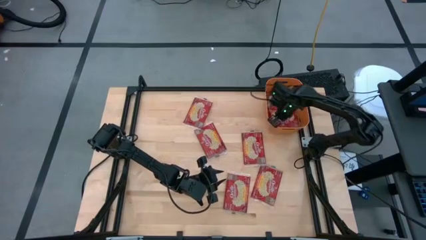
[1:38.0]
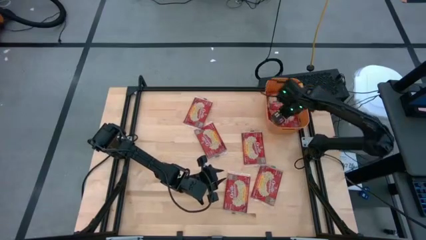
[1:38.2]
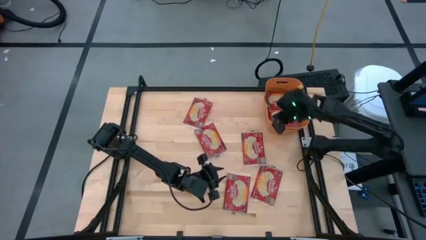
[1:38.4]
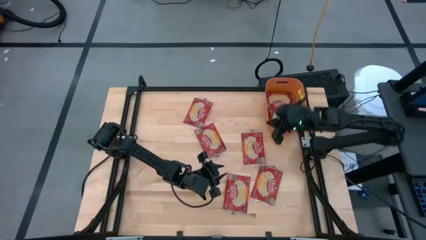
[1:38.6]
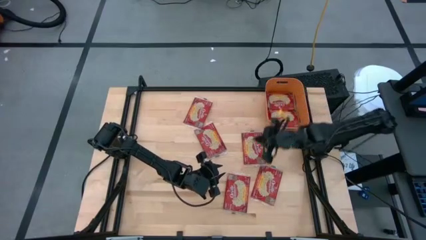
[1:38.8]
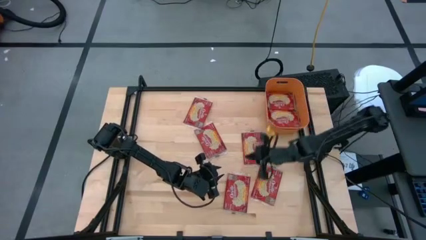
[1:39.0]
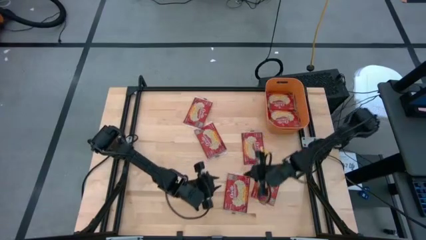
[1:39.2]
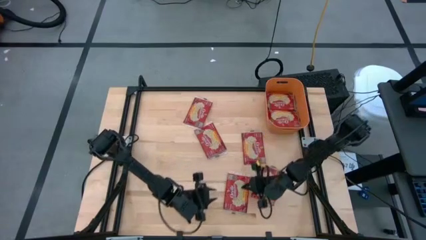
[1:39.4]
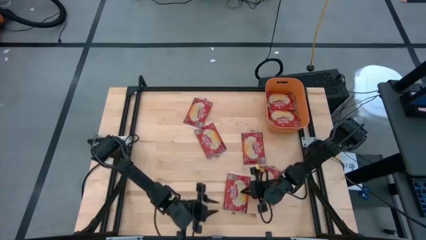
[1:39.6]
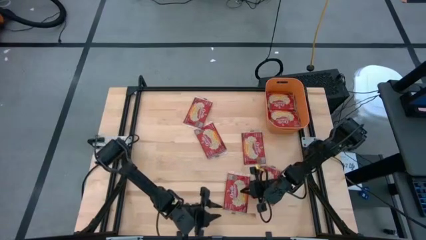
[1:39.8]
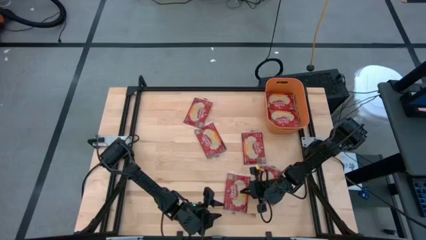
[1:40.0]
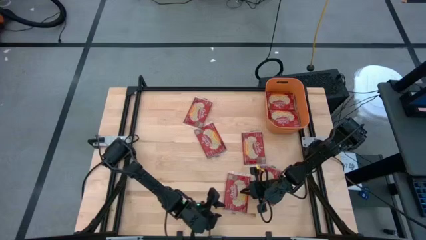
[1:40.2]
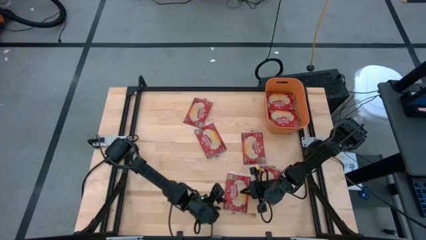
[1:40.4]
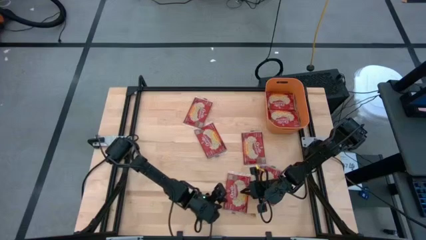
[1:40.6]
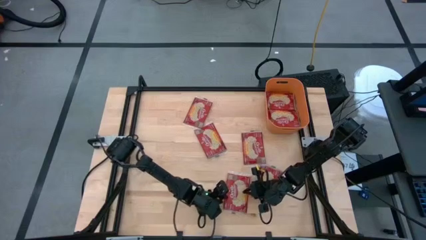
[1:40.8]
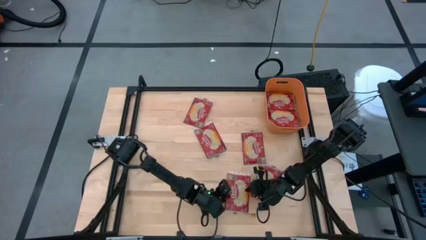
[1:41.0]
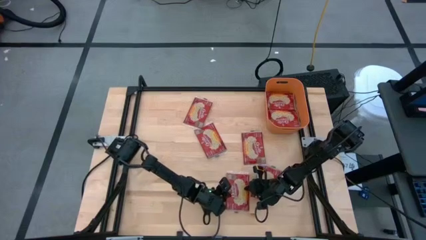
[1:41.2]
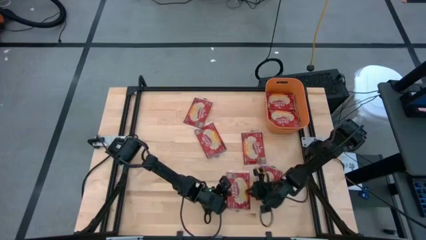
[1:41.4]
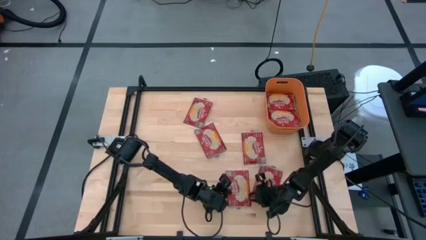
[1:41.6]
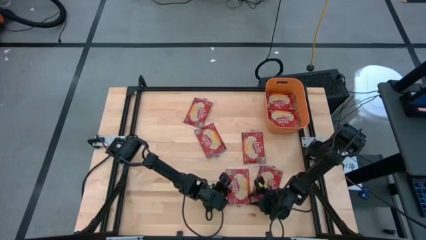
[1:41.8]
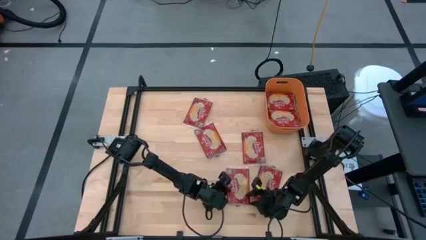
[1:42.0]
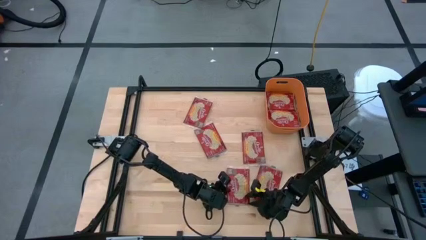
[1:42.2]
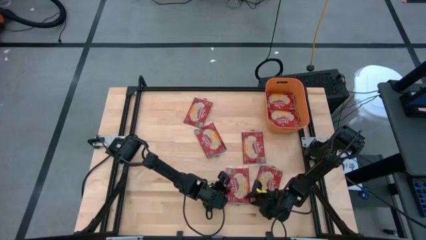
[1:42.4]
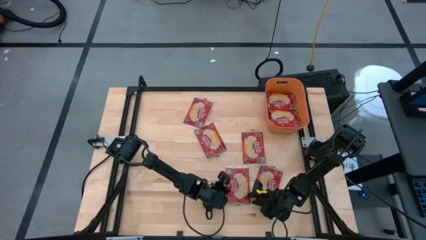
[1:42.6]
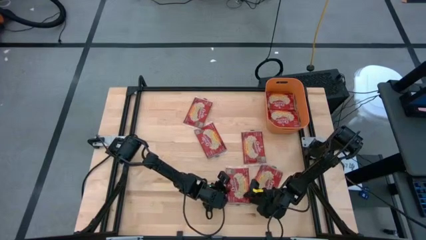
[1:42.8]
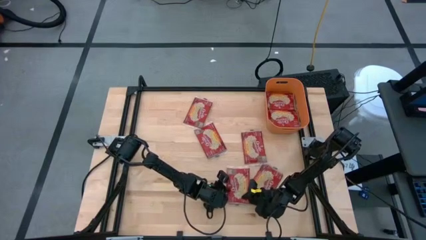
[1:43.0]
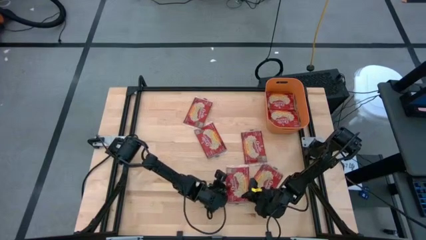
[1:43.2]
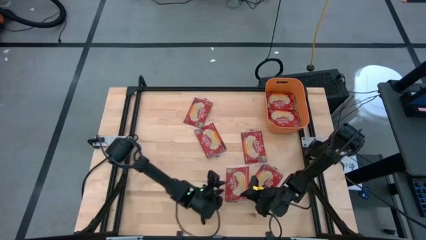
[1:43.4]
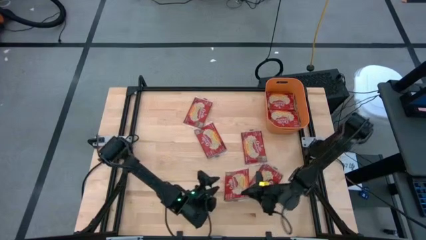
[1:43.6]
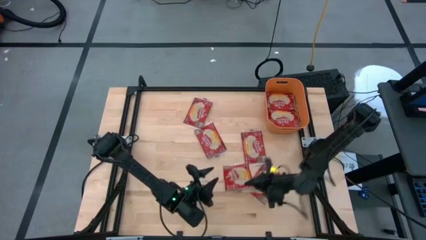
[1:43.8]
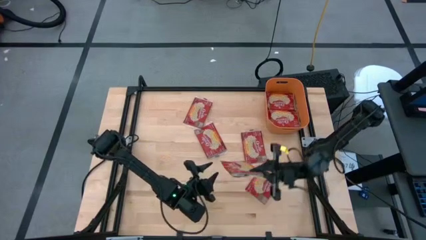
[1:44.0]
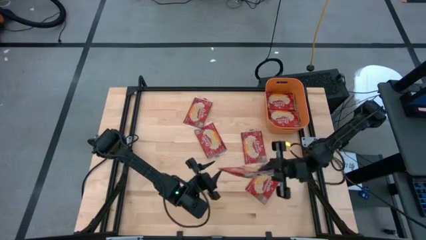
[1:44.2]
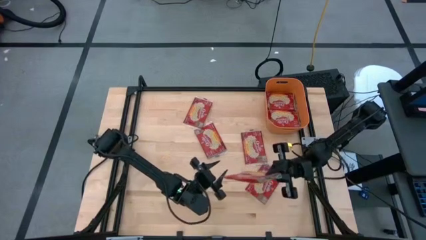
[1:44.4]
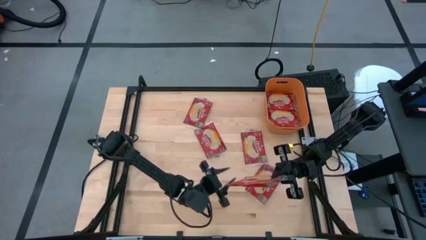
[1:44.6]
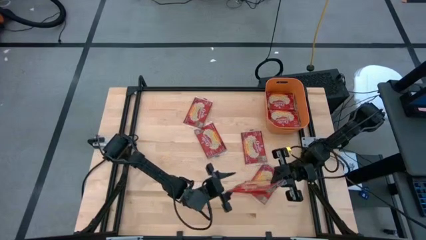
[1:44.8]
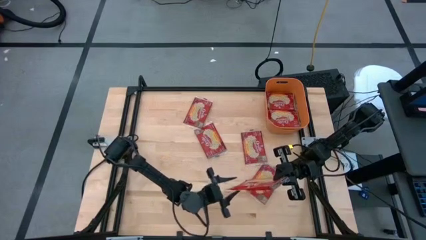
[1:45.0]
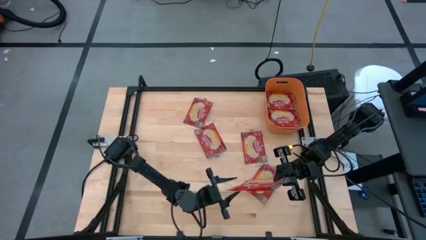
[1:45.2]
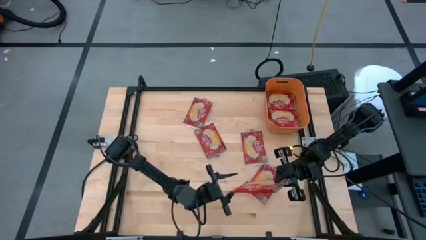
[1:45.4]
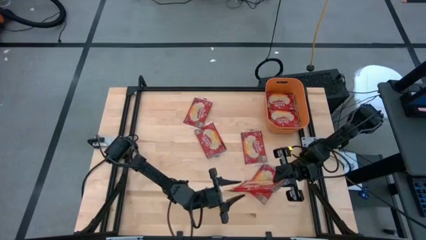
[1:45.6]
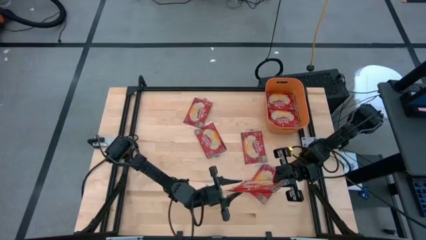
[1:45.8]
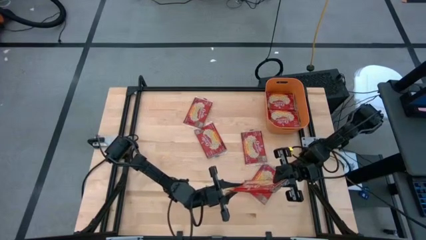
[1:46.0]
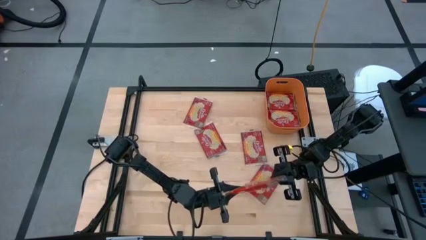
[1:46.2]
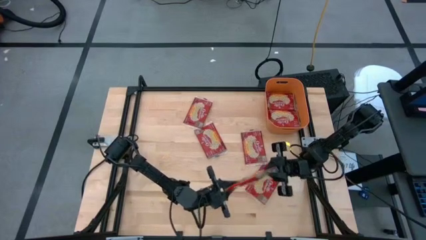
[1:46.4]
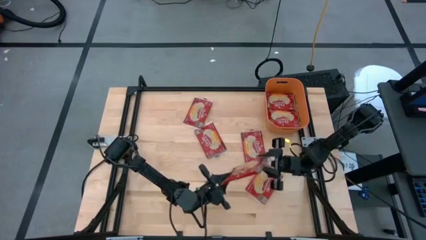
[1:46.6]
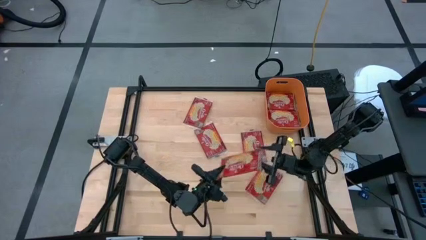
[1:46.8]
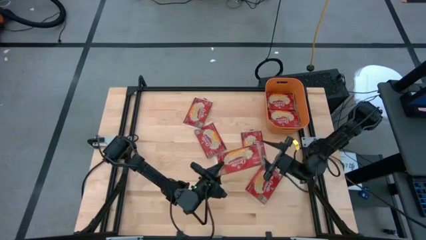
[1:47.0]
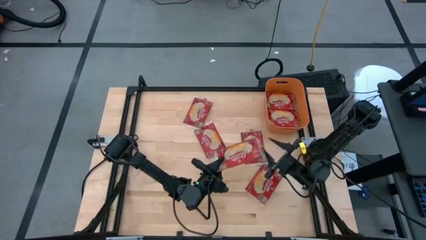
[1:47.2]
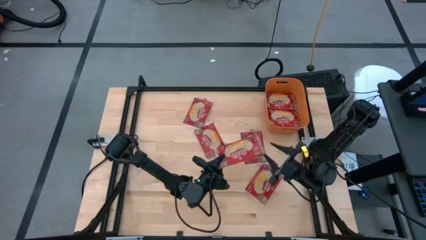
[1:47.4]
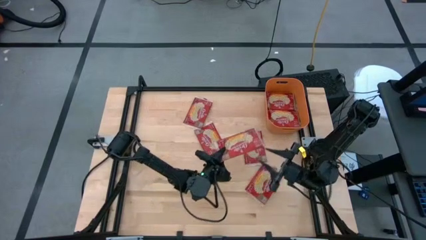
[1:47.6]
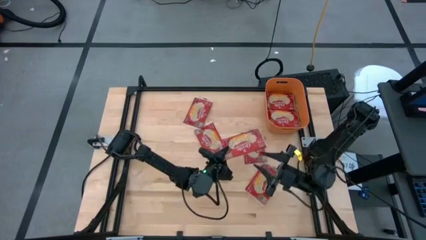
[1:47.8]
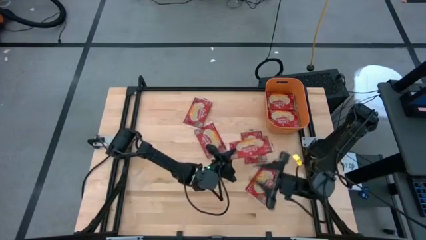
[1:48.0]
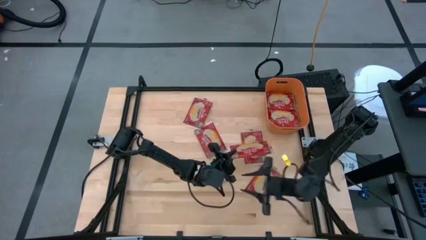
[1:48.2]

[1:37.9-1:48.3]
Task: Sort popcorn bags into baskets
Put the red popcorn bag into the orange container

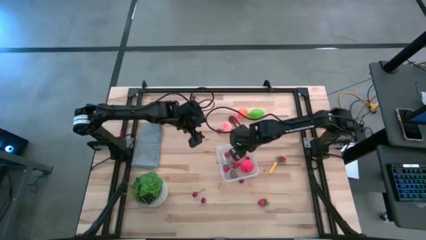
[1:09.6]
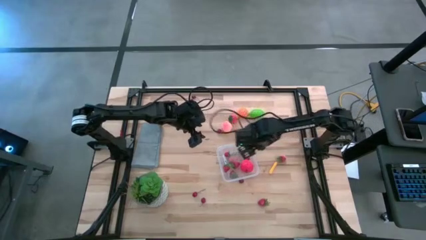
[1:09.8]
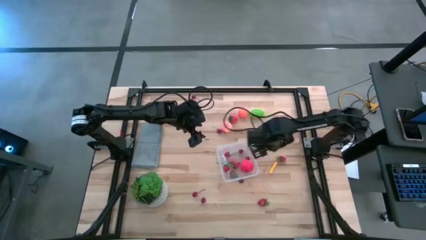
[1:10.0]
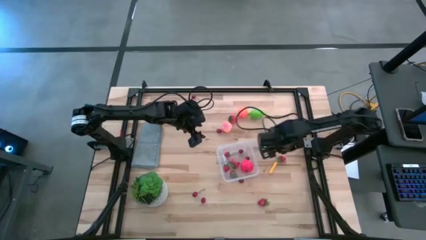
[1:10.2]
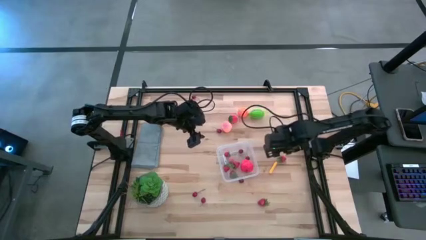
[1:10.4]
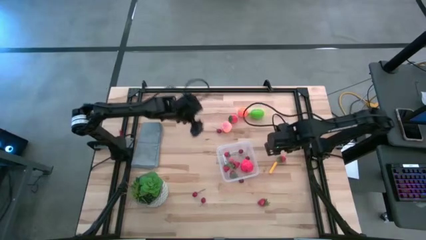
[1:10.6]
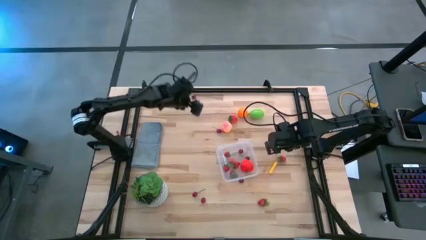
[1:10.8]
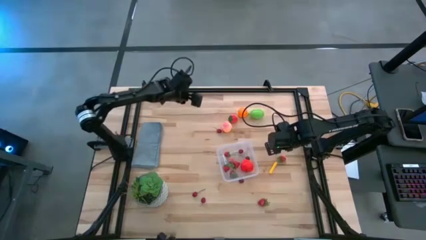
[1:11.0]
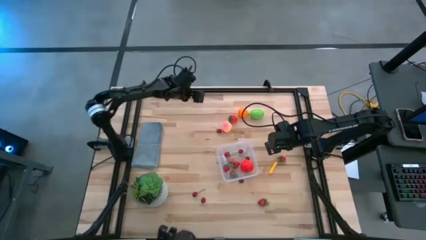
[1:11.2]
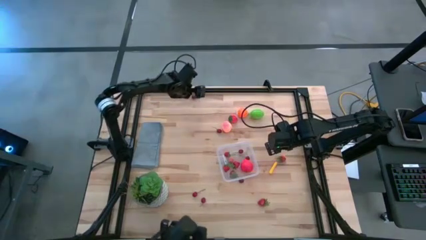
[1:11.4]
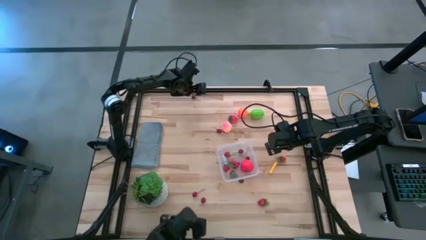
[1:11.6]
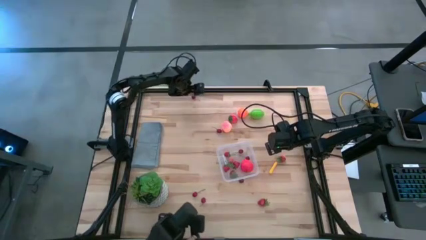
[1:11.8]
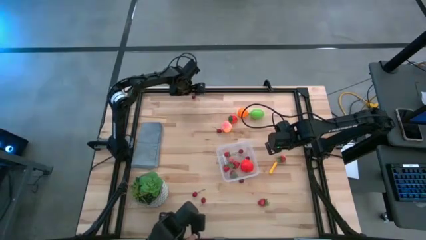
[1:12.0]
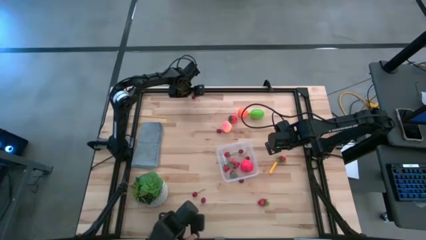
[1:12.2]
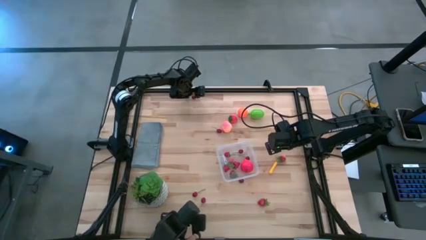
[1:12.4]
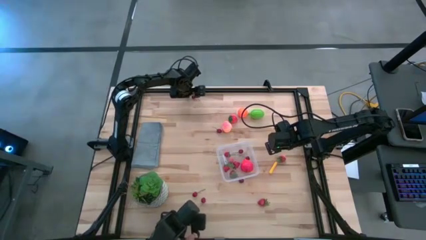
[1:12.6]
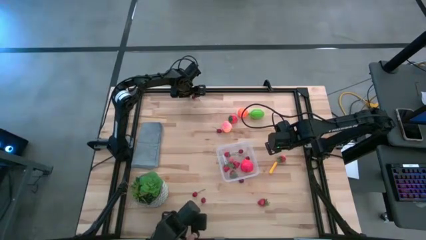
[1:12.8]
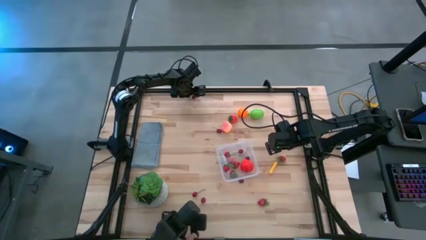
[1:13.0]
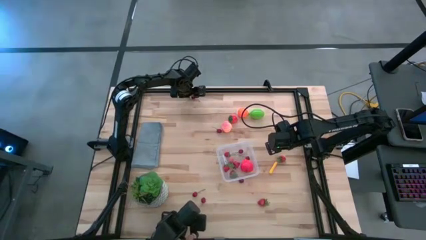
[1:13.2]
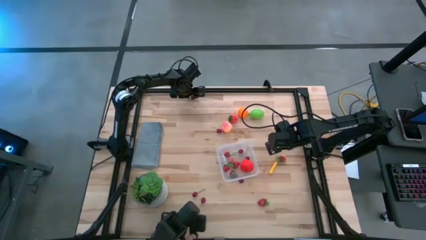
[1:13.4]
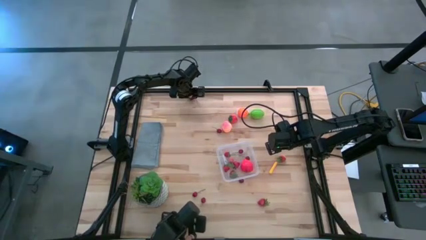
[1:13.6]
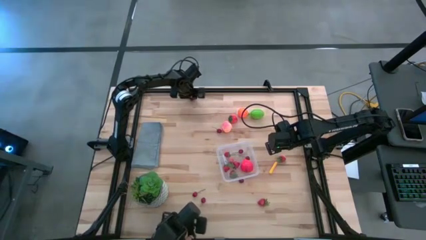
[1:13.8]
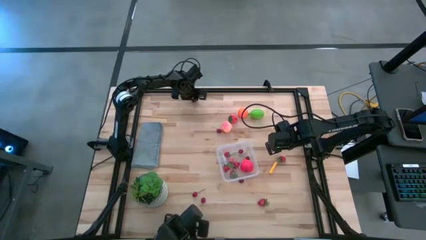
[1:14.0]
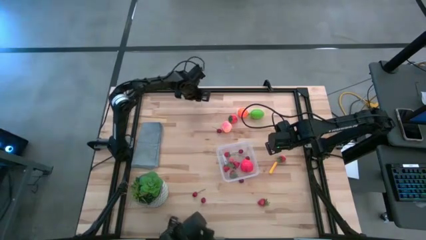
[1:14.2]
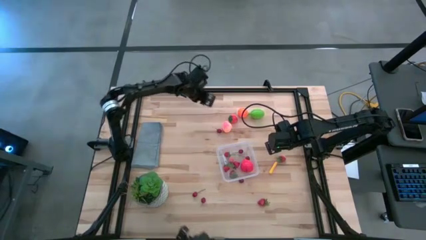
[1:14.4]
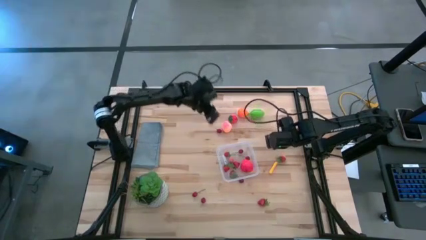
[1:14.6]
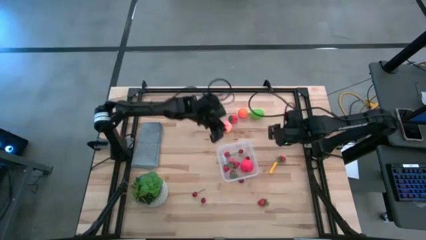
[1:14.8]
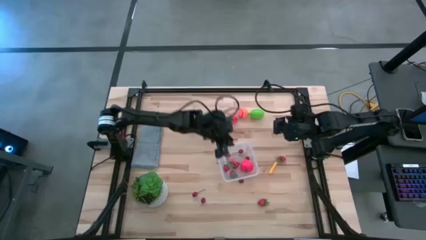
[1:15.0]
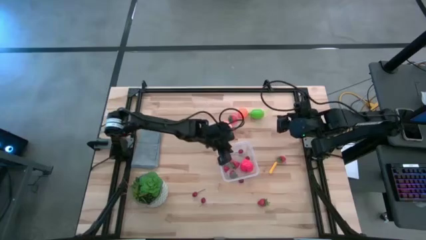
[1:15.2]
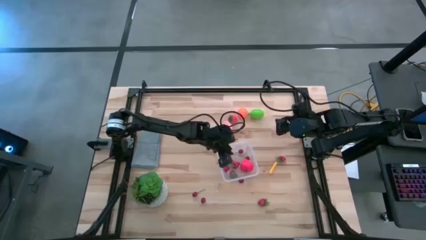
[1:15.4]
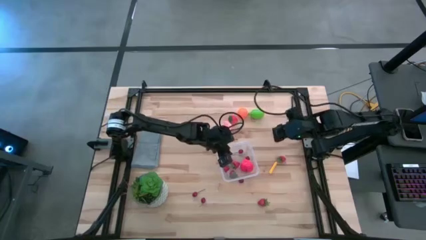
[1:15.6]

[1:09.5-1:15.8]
Task: Pick and placing Produce into tupperware
Put the cherry into the transparent bin
